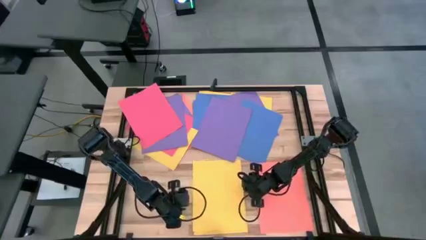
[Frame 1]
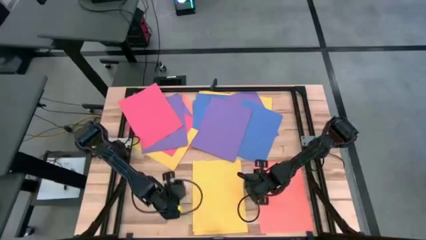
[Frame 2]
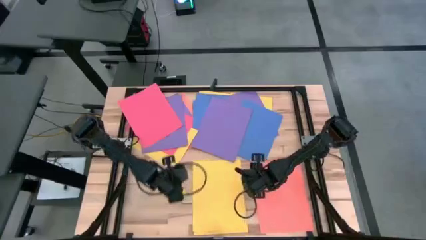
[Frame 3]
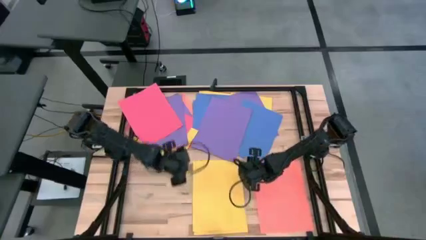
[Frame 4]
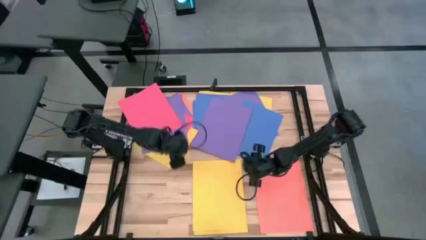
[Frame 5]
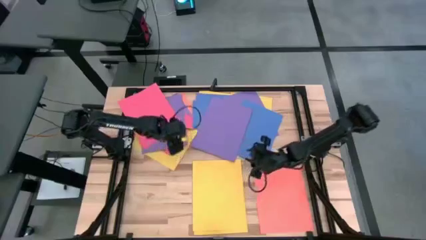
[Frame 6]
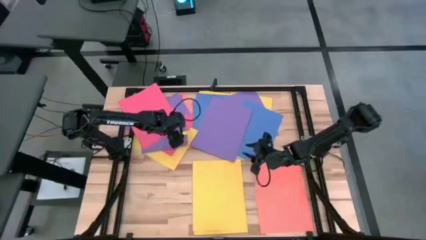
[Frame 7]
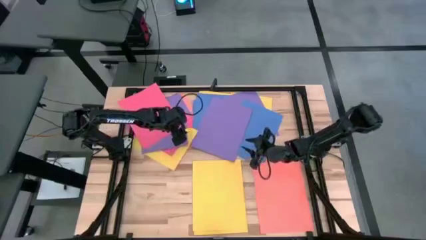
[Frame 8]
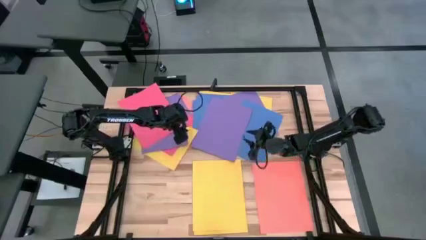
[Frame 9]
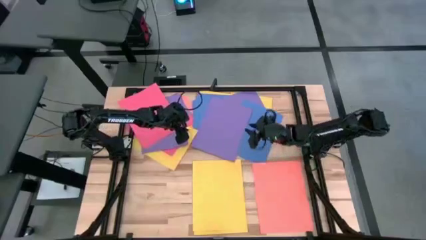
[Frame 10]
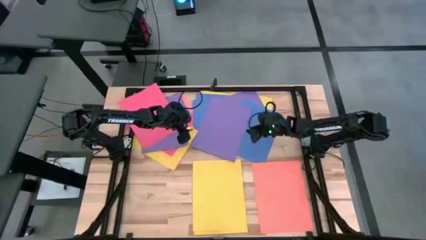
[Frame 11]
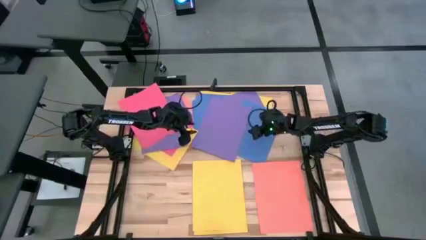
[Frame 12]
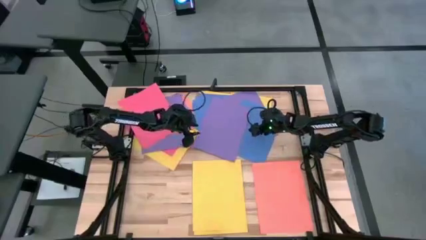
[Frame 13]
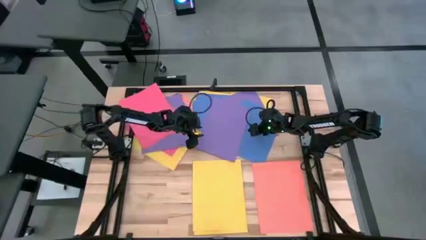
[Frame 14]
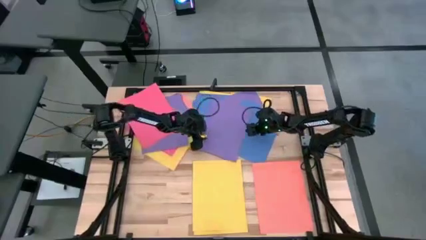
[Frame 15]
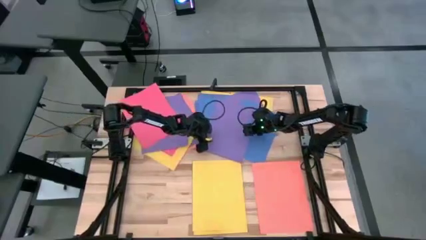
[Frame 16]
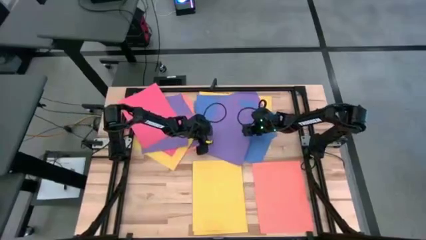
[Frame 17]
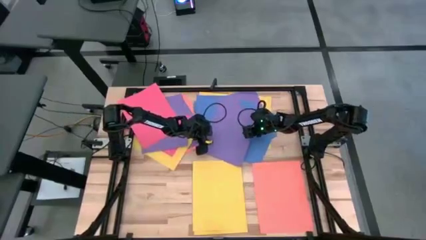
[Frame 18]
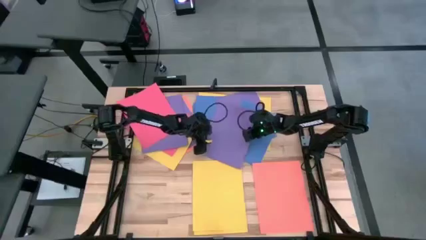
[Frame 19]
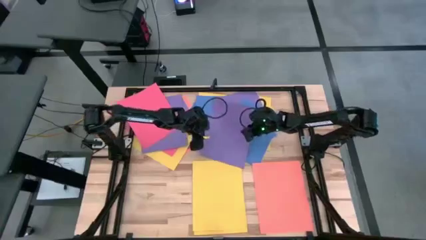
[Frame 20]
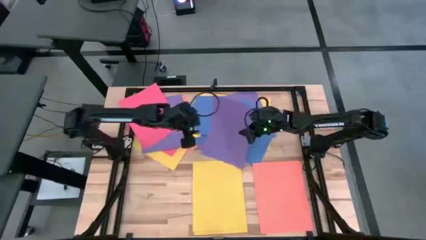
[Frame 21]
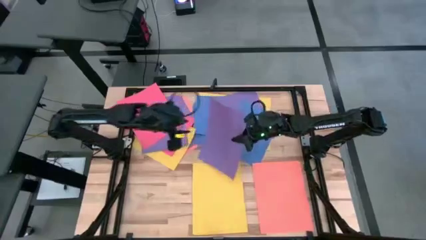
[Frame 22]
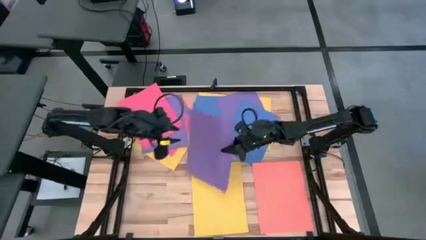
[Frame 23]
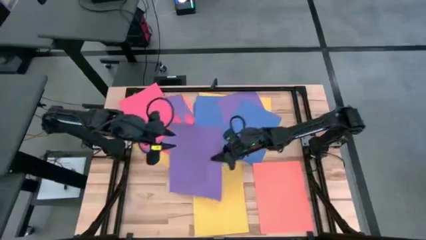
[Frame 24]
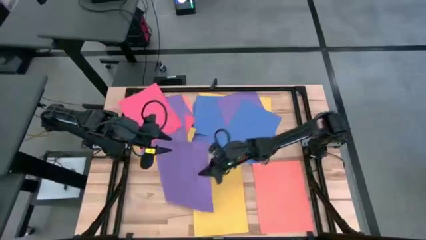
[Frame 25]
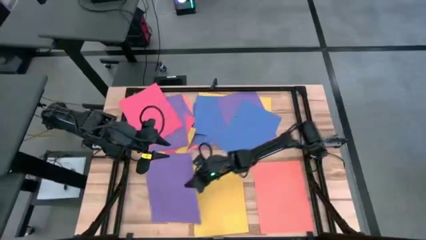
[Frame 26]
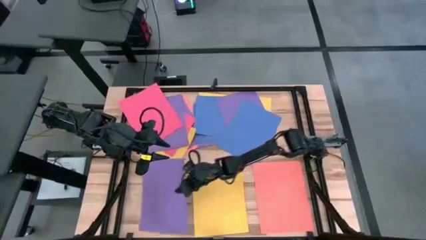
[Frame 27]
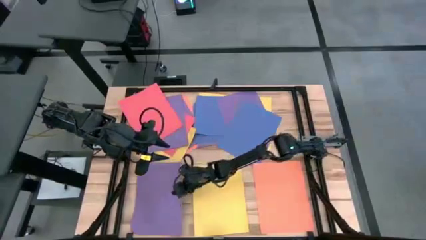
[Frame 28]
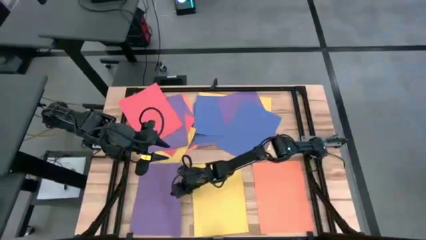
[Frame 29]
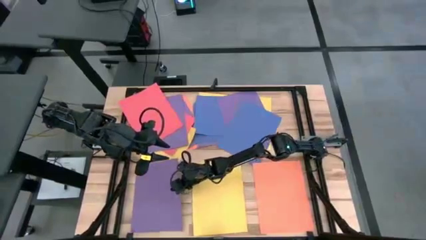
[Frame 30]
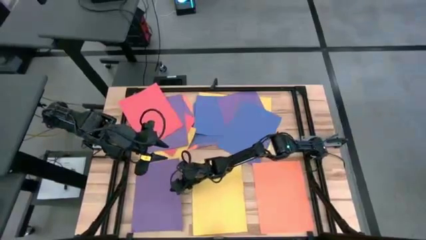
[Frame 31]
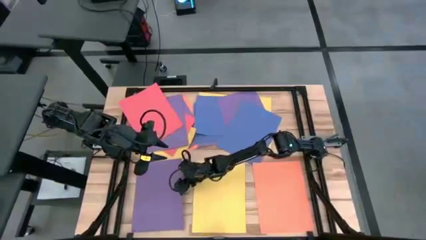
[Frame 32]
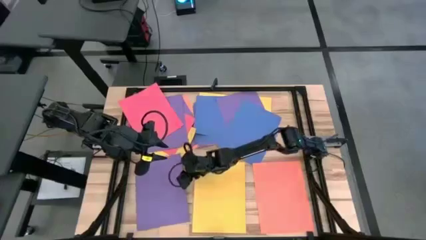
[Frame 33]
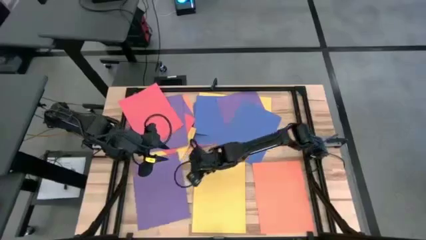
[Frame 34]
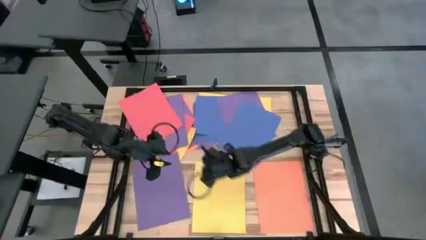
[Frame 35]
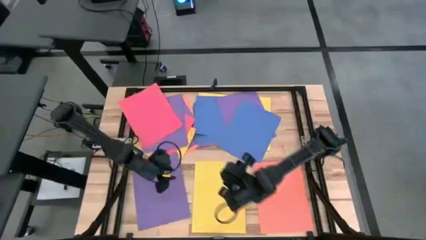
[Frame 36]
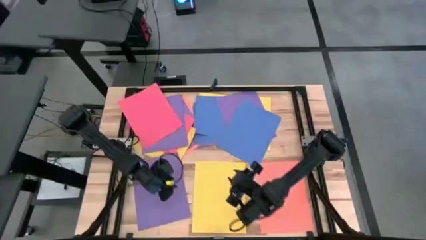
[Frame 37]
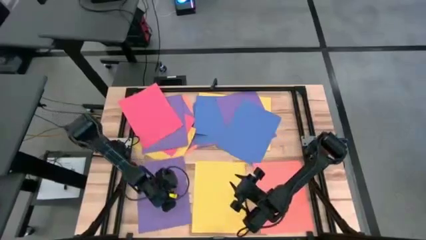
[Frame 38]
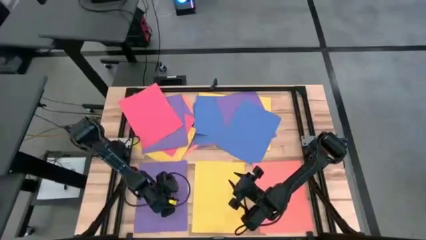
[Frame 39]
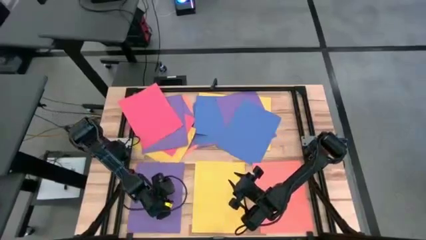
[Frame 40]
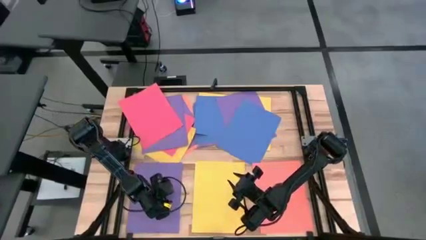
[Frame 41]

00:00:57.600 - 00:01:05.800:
Task: Organize paper
Put the violet paper to the bottom left of the table

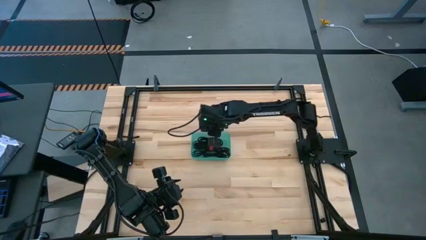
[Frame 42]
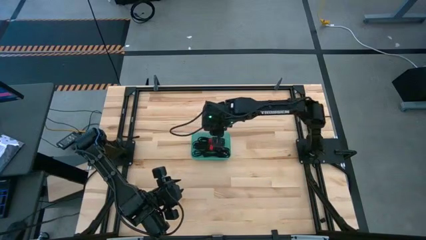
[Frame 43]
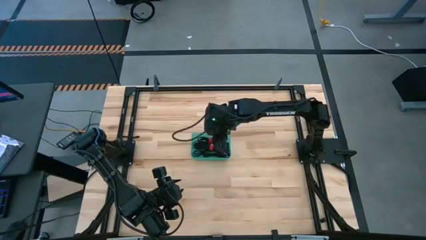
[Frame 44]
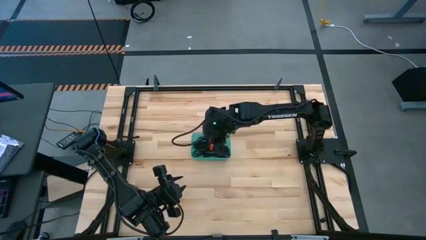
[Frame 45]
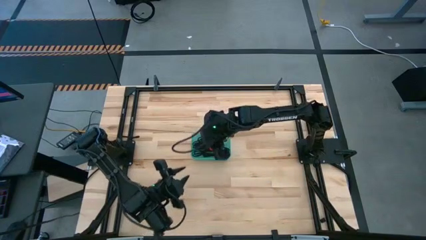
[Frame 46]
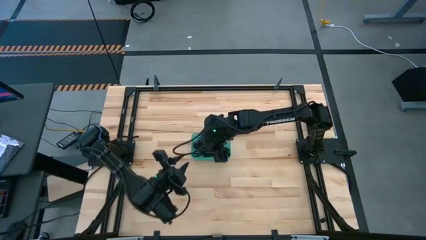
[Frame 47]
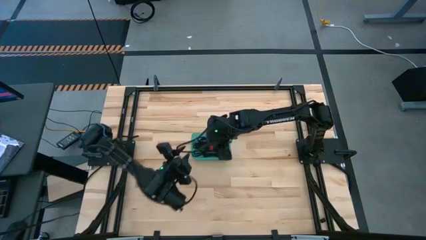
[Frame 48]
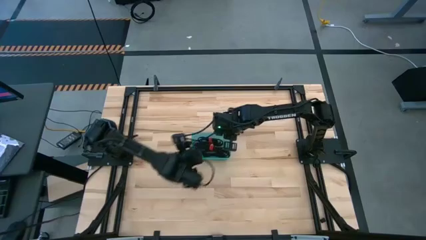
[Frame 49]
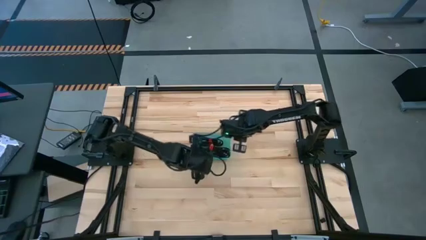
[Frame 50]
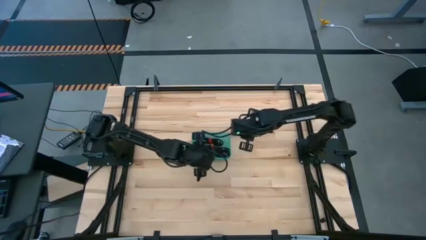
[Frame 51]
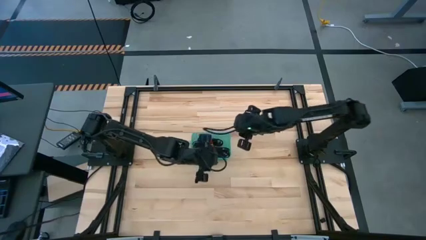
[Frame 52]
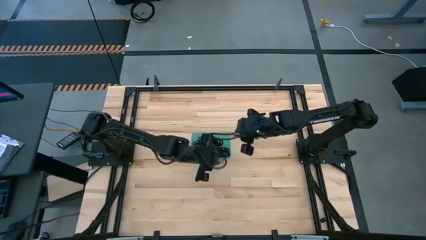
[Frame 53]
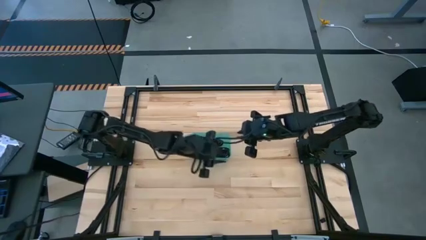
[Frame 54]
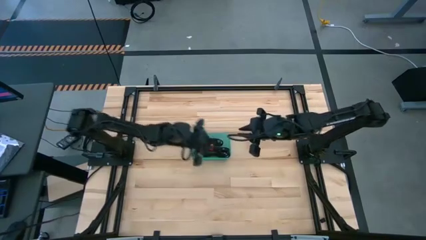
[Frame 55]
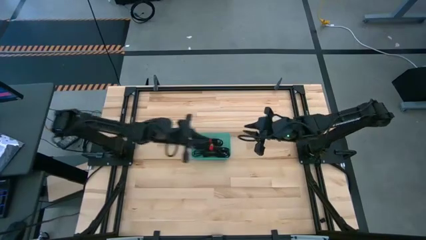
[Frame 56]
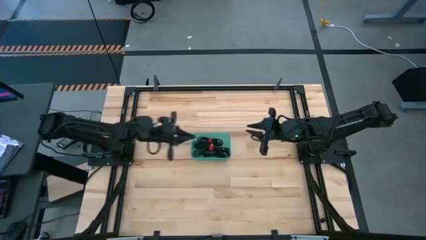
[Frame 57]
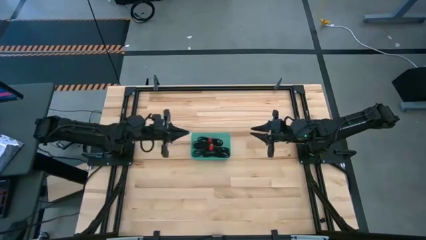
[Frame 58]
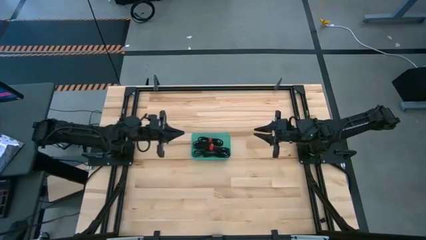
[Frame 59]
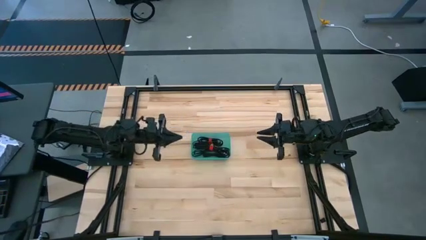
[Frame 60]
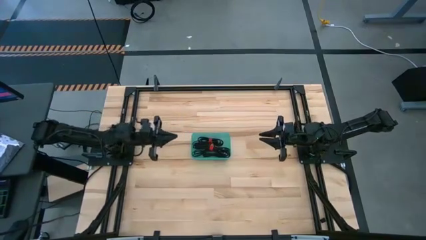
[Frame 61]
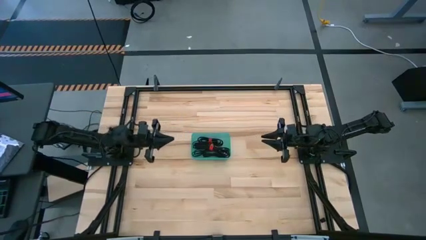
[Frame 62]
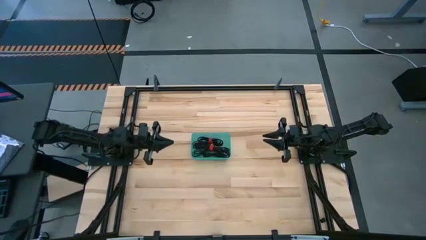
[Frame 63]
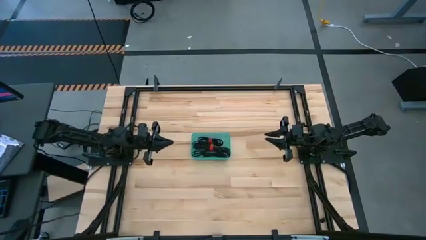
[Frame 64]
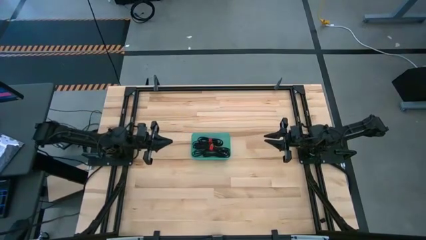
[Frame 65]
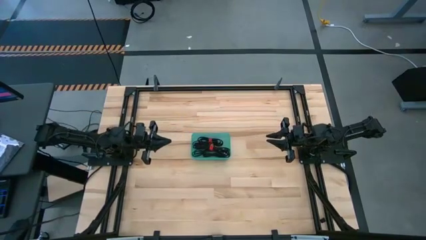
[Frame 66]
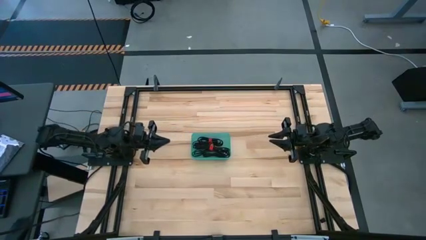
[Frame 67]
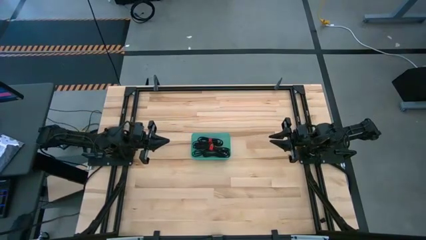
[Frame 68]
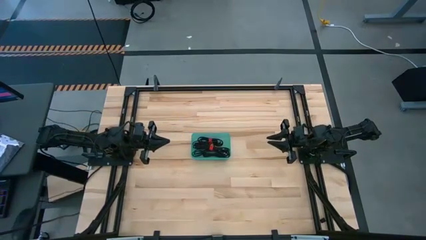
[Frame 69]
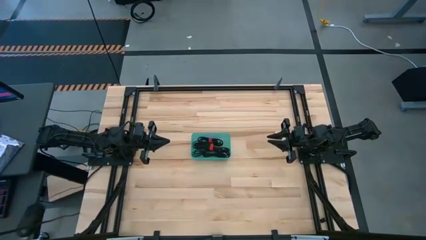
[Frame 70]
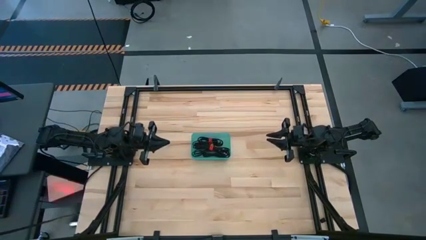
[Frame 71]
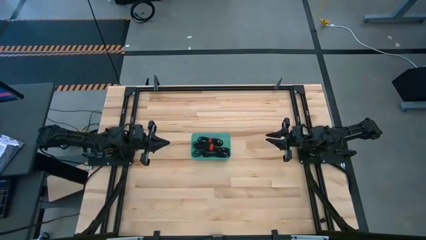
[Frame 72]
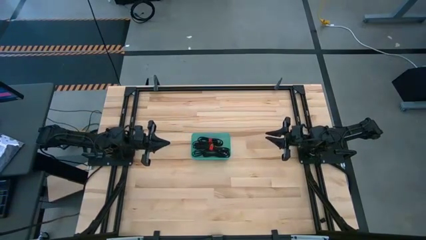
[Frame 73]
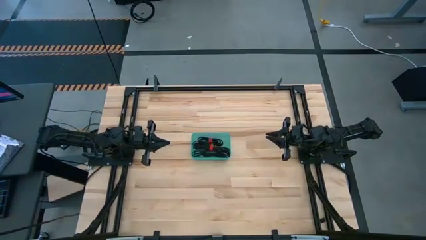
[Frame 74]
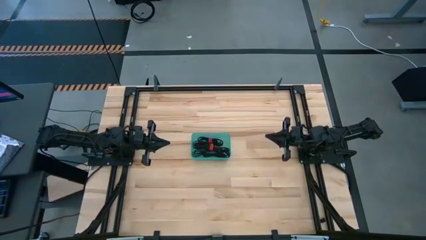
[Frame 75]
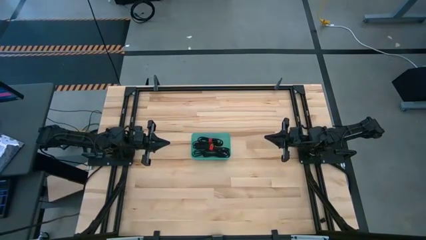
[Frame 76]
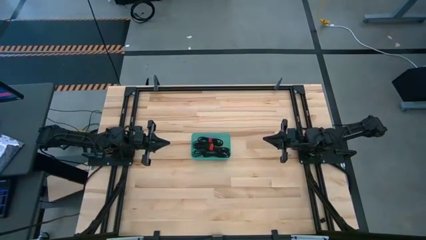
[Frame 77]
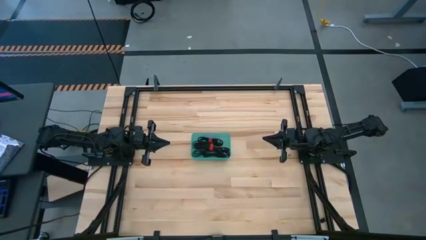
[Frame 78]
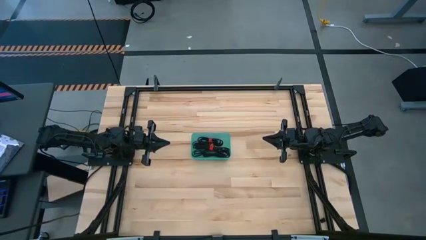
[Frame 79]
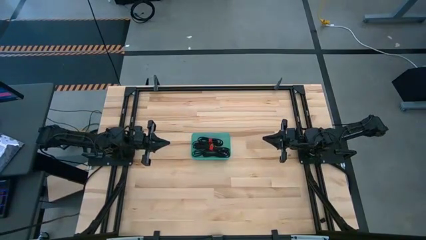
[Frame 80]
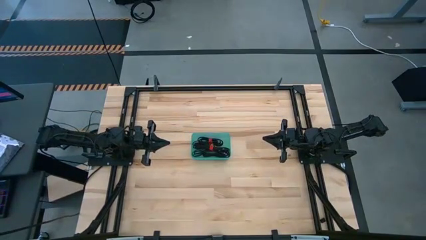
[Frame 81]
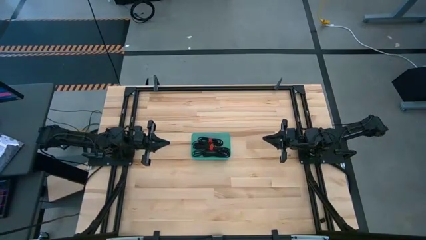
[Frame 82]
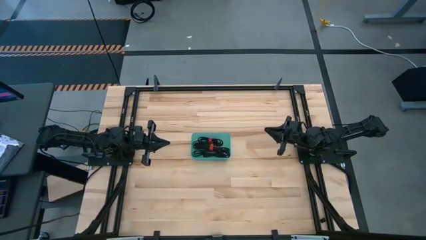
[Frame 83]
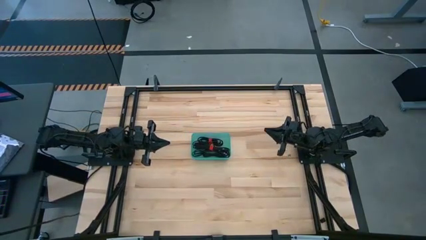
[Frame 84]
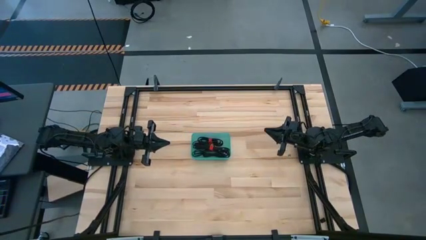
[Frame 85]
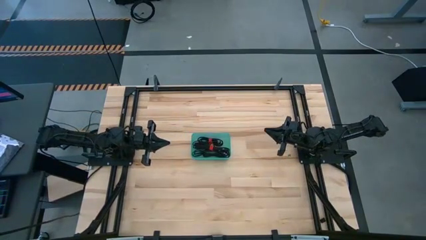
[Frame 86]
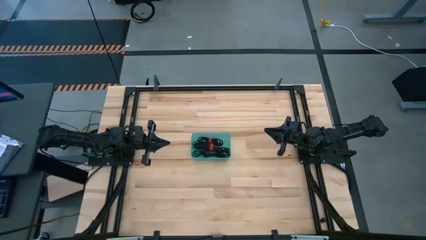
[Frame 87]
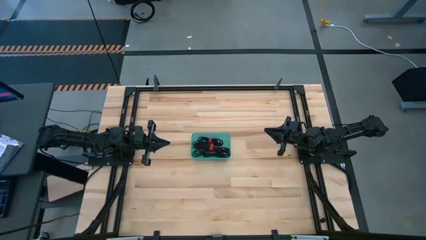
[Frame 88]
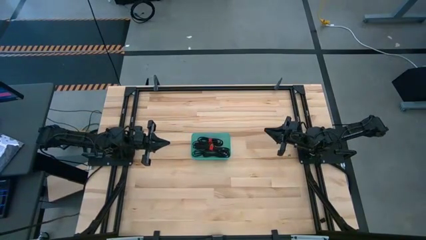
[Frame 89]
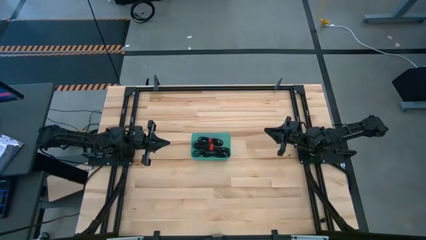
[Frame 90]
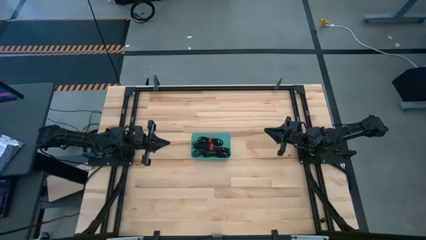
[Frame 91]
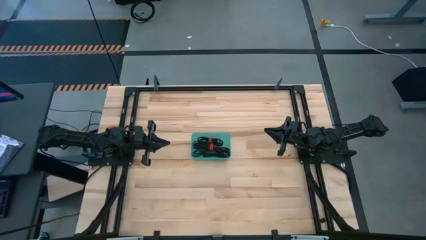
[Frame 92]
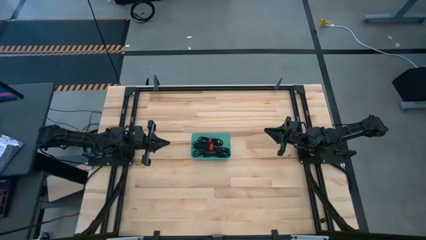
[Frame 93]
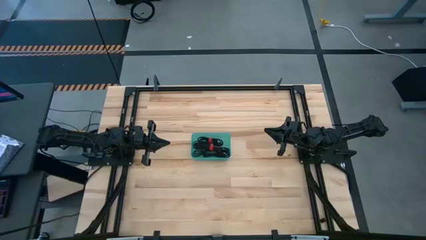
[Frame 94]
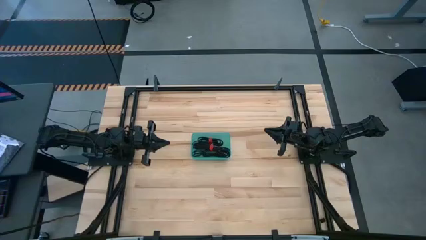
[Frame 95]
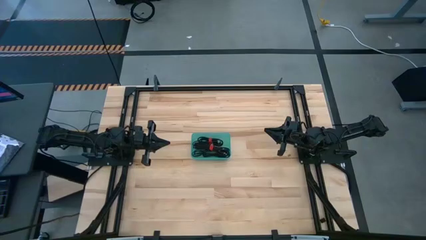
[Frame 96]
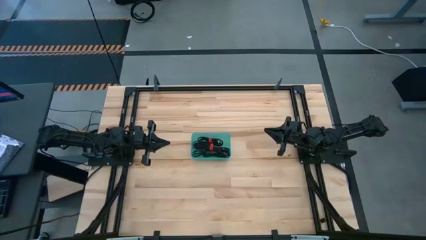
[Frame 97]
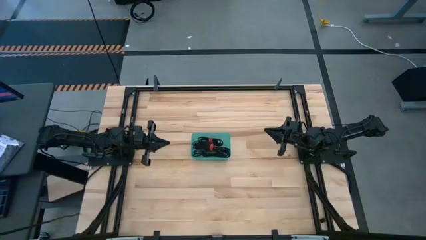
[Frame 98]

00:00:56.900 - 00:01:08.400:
Task: Pick and place USB-C Cables
Return to Home Position
